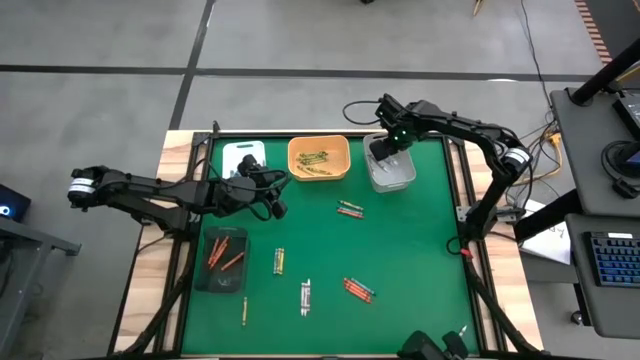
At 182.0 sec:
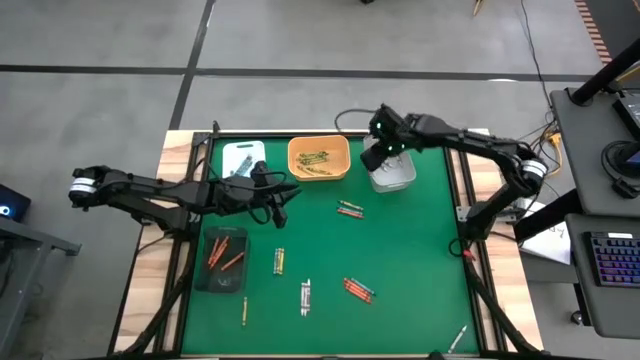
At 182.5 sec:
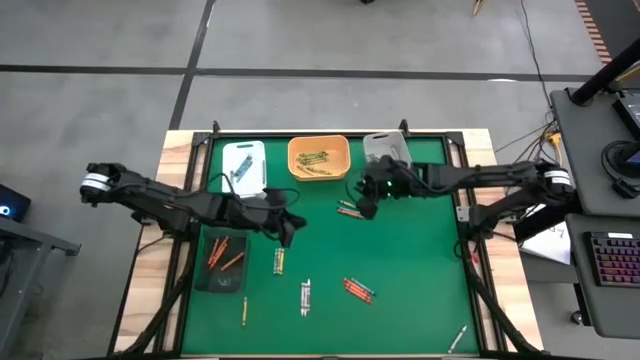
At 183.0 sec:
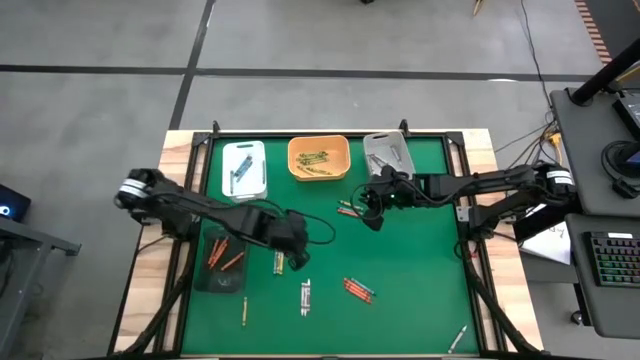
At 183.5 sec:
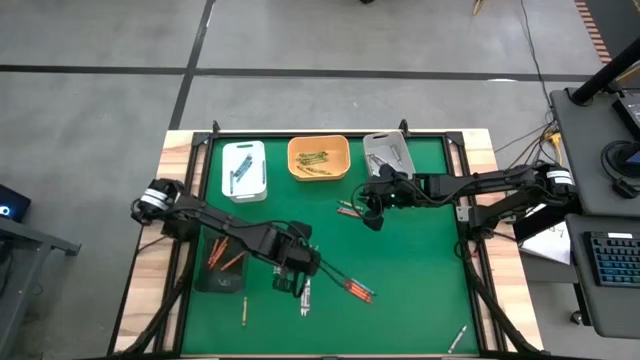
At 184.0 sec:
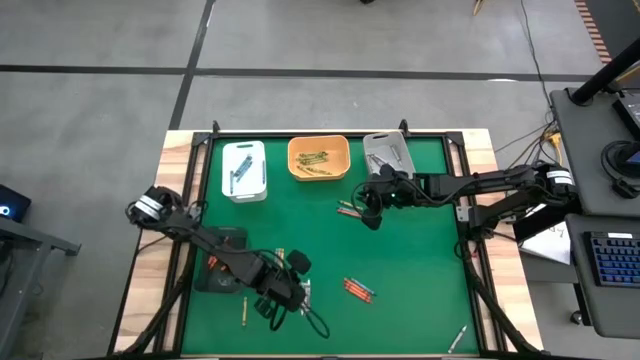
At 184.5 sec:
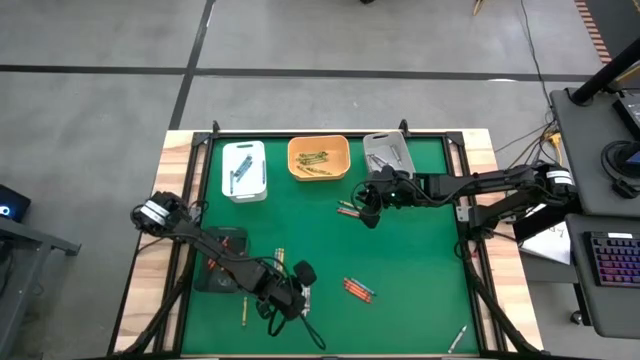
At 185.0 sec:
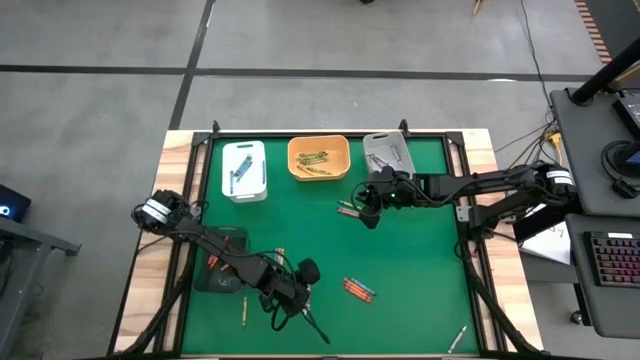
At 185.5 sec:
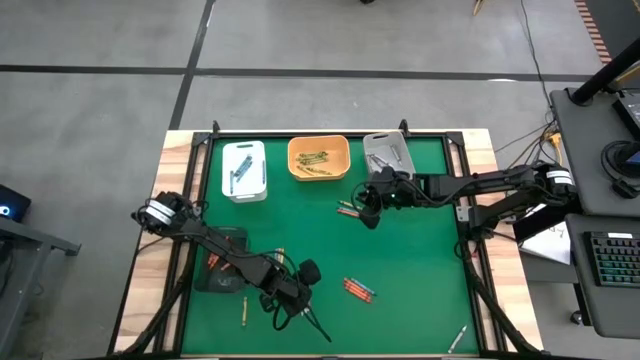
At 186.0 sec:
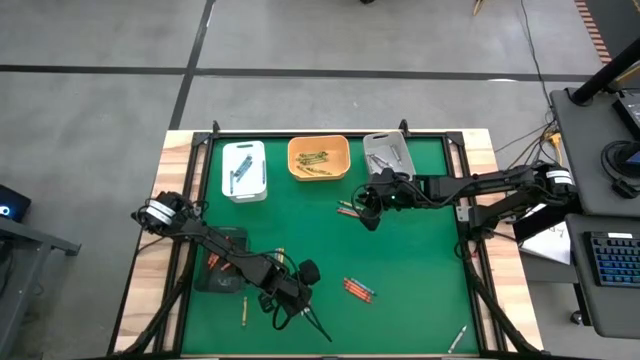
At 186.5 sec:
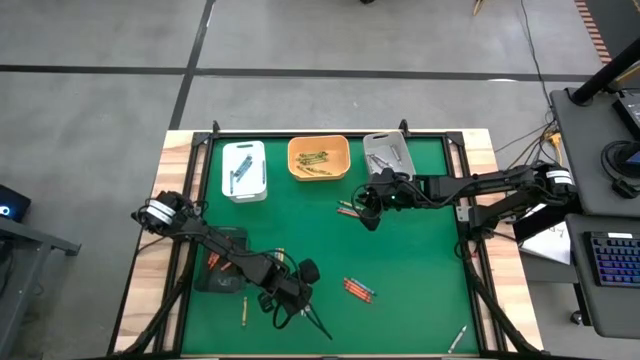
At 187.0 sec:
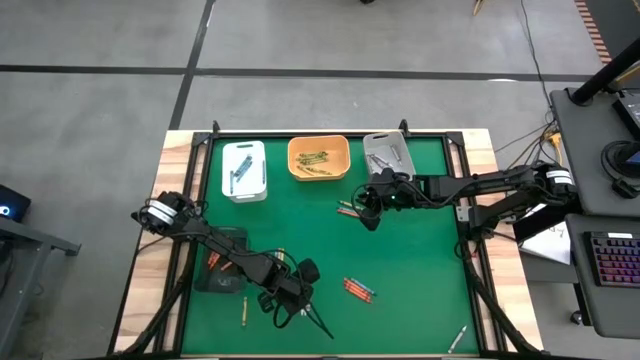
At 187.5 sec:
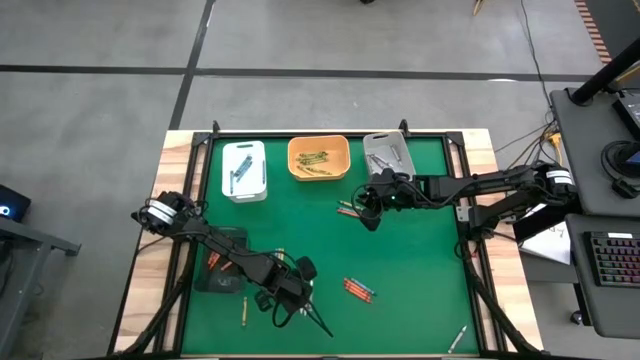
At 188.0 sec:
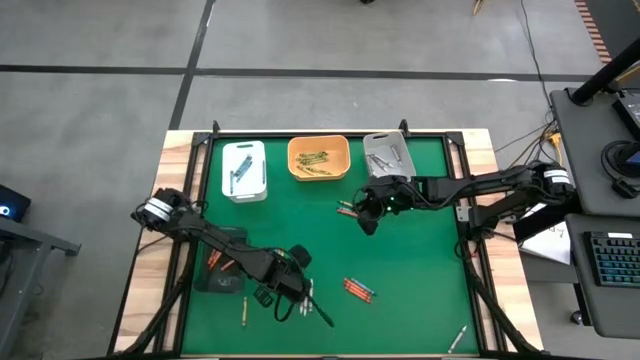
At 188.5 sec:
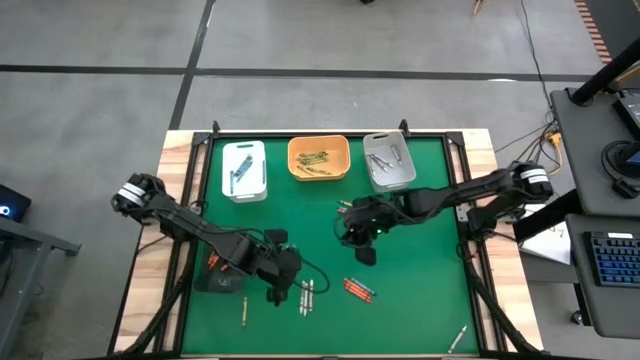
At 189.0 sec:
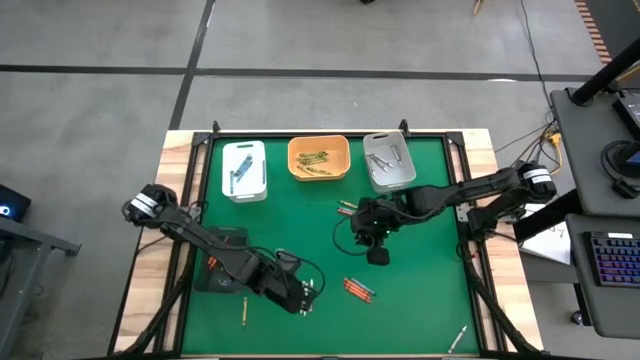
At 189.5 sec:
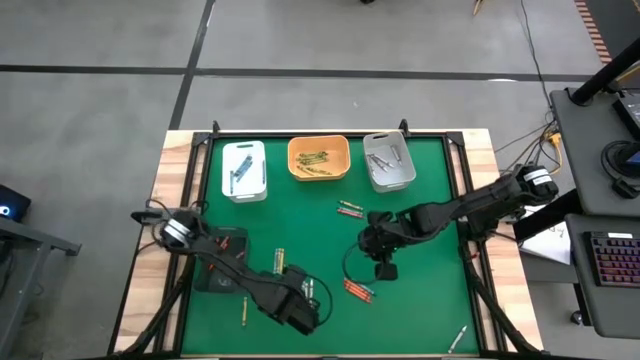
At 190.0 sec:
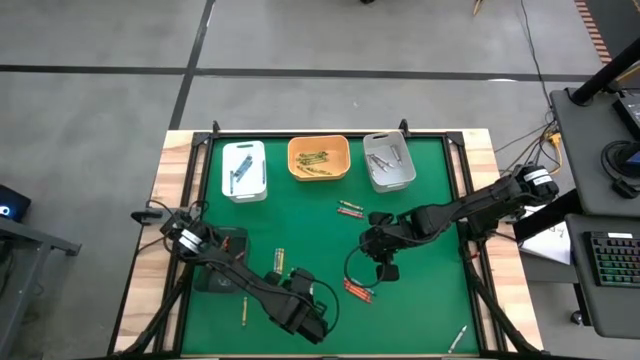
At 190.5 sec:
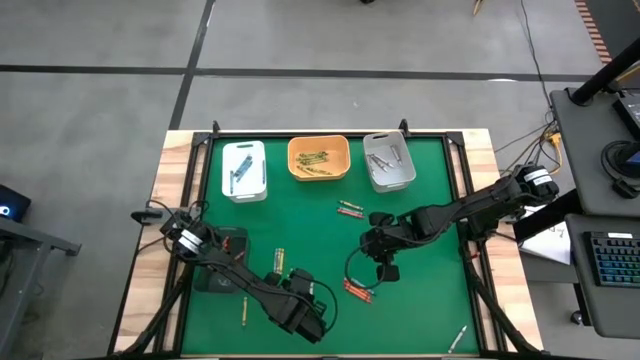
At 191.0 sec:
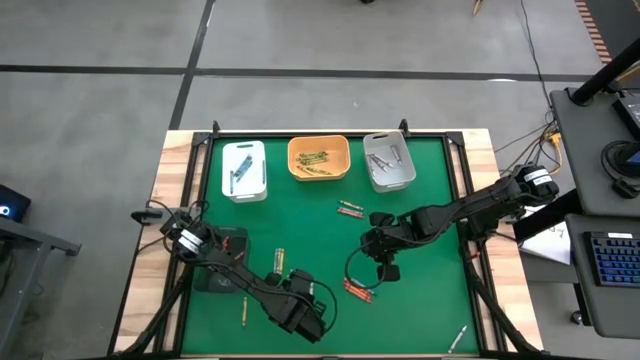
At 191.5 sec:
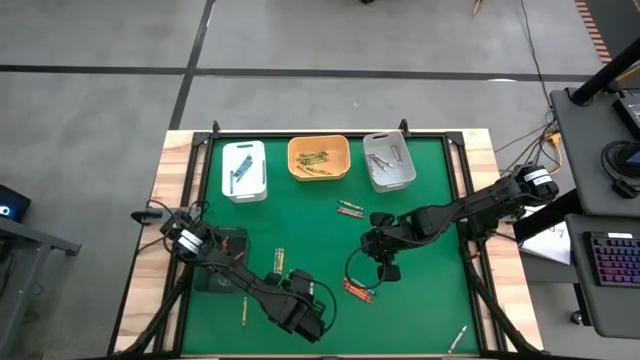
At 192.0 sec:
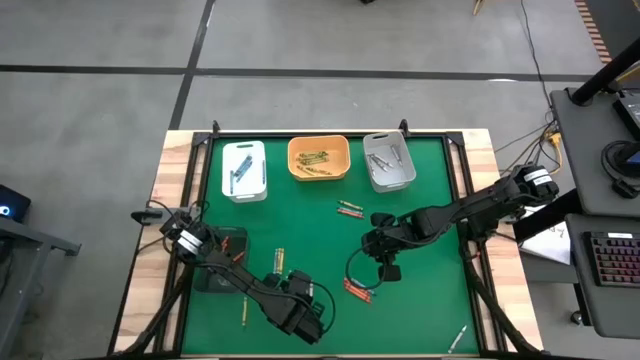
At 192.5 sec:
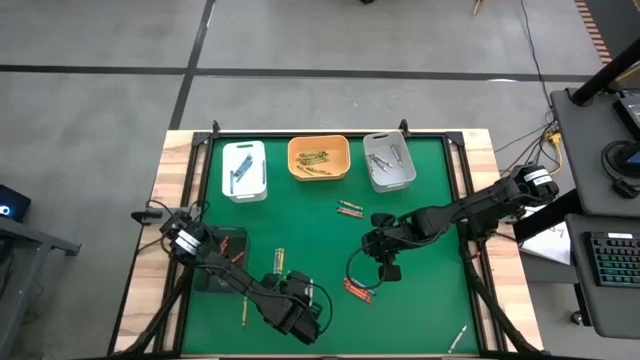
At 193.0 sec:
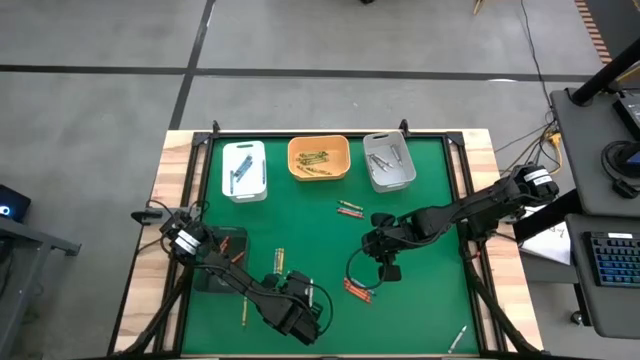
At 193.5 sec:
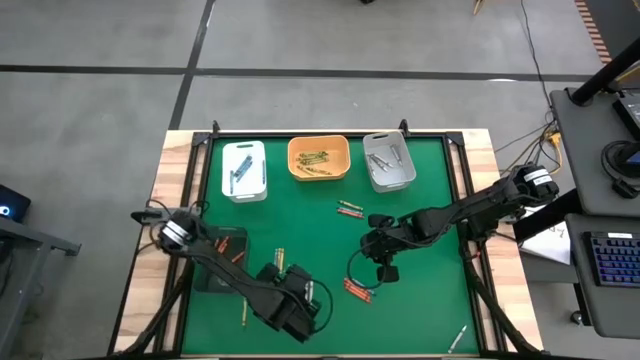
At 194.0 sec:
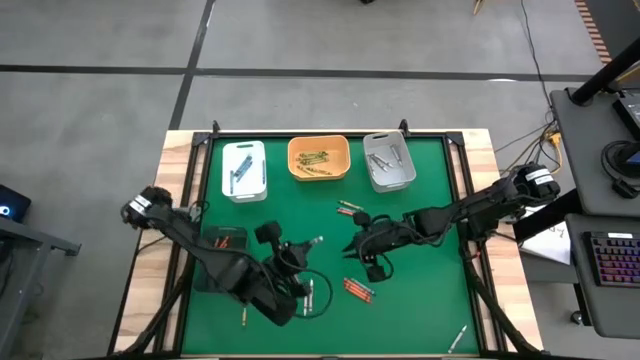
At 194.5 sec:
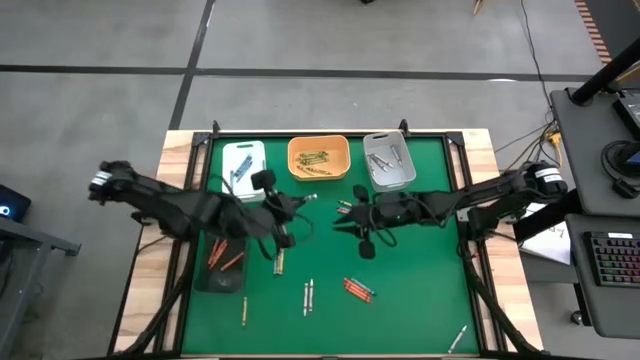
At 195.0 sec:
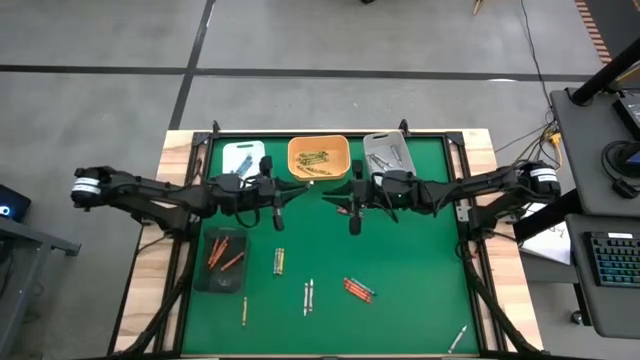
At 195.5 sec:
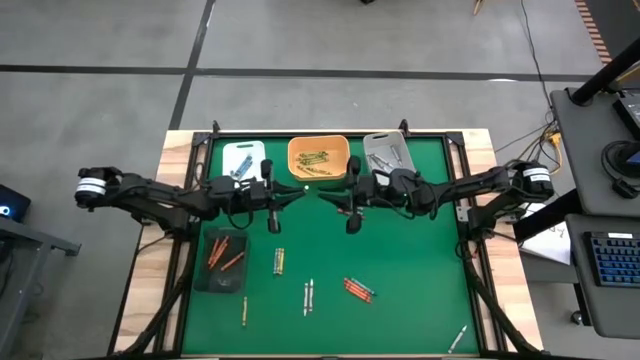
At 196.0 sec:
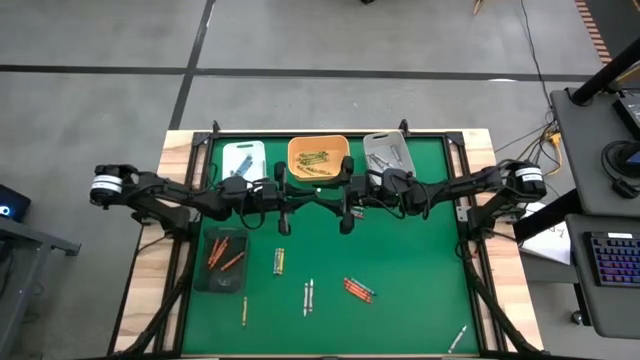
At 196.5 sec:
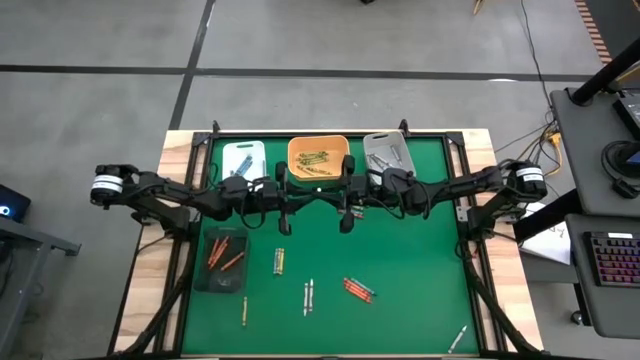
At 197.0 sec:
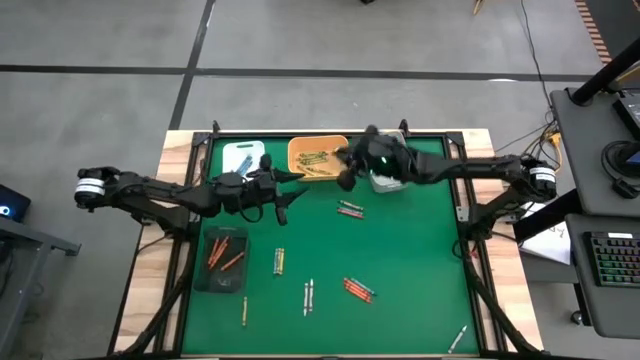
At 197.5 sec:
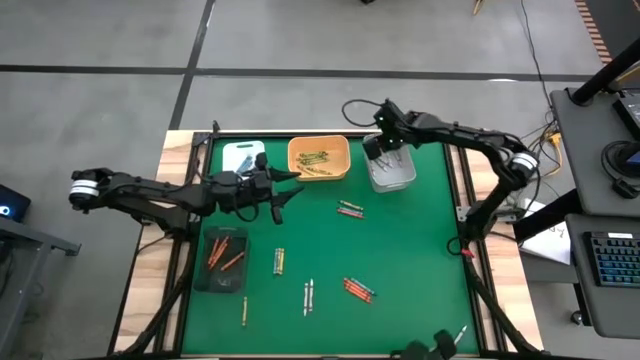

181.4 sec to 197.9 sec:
Task: Sort crayons
Put the white crayon into the gray bin

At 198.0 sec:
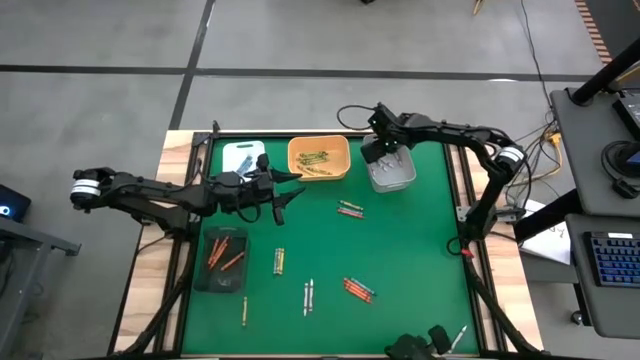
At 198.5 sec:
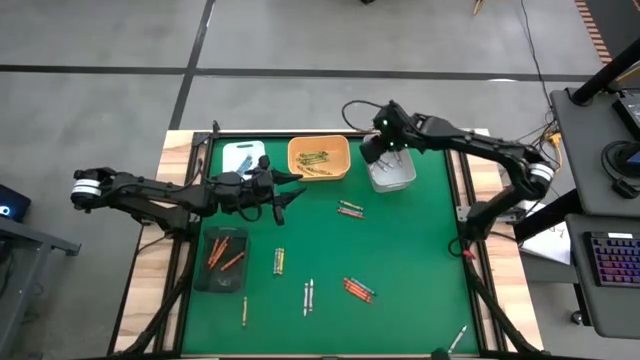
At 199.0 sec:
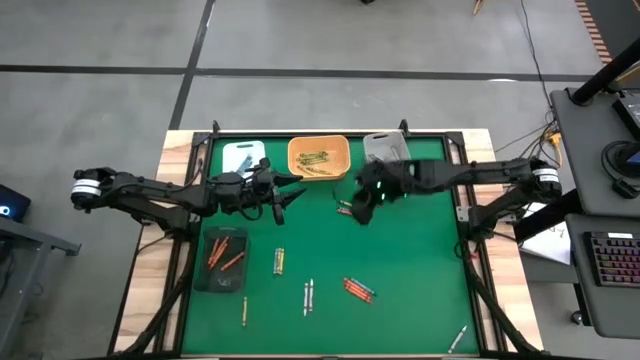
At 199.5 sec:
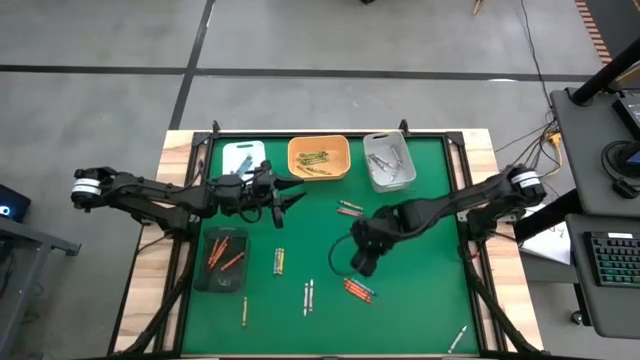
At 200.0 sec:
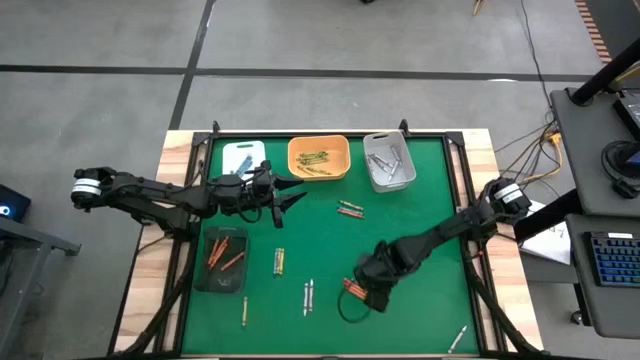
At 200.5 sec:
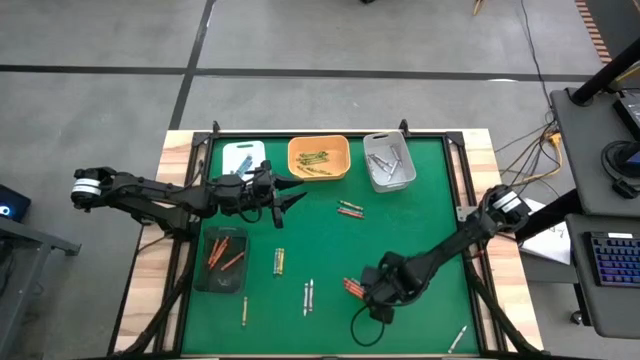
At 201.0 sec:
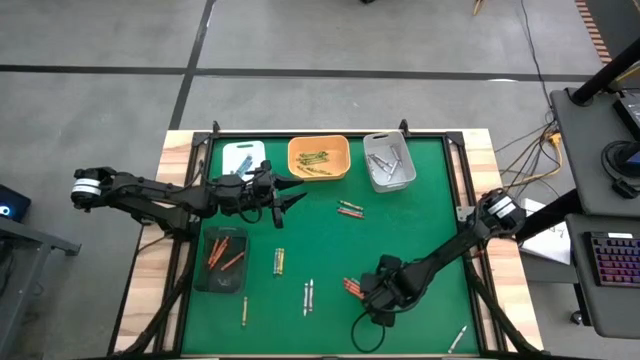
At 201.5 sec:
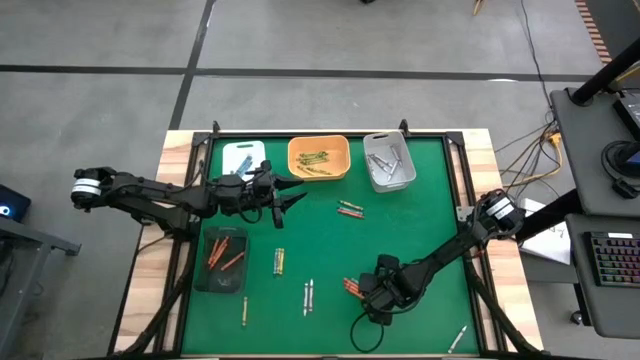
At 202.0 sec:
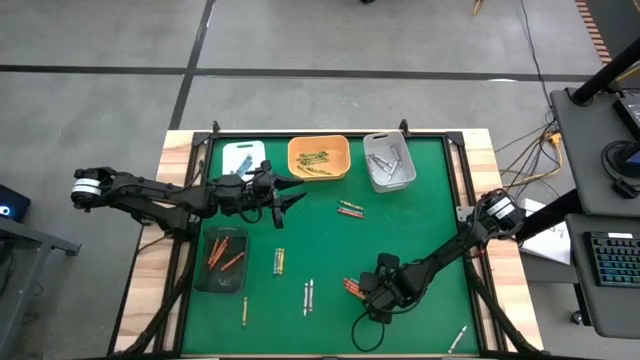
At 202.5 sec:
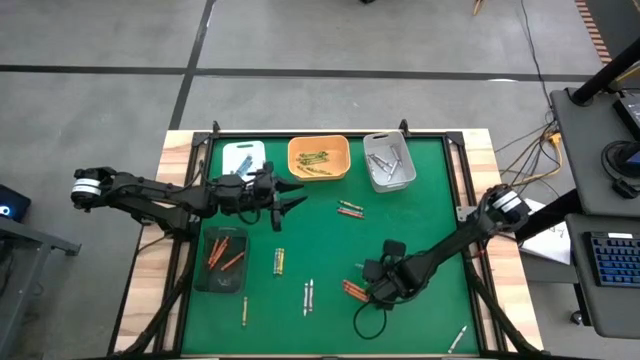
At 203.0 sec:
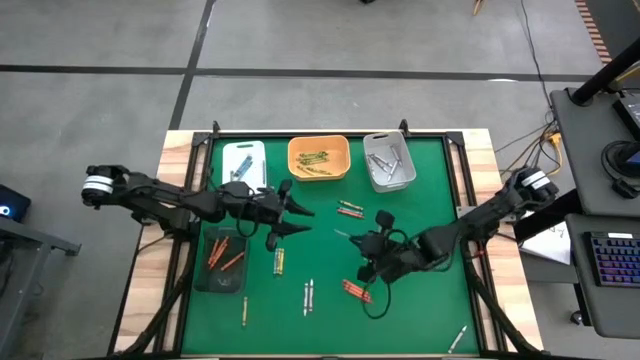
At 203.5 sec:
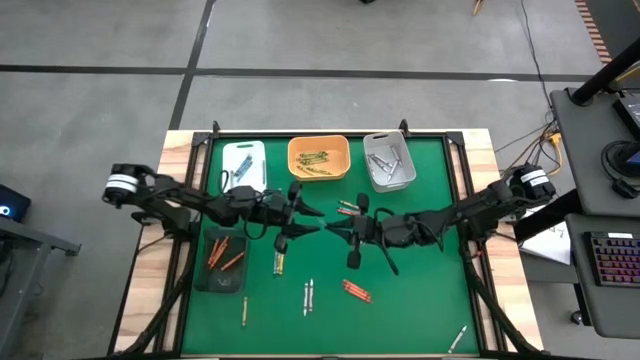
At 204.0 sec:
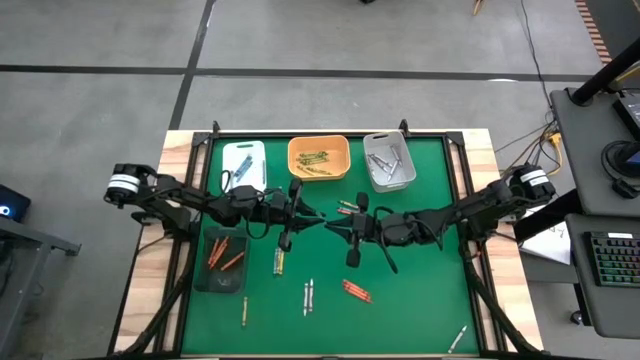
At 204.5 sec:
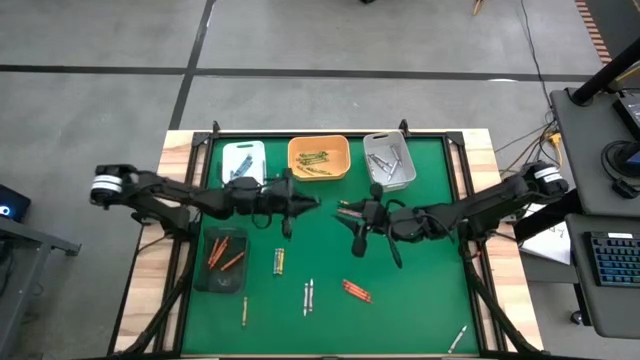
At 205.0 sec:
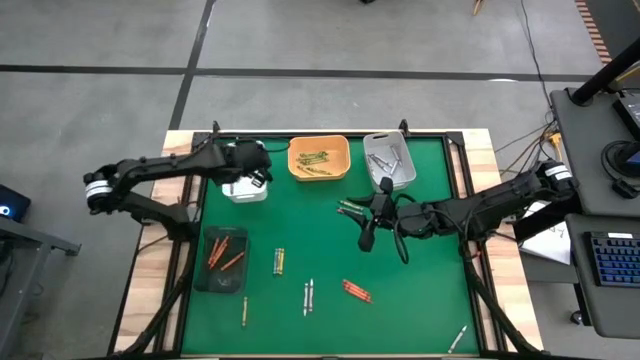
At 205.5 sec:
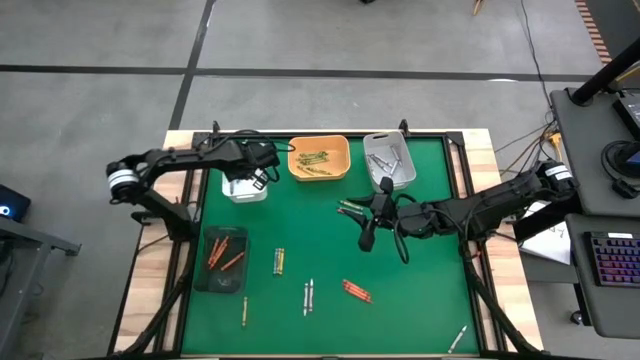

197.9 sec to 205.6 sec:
Put the blue crayon into the white bin
